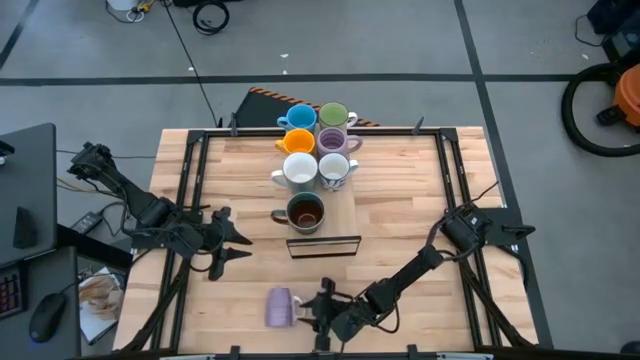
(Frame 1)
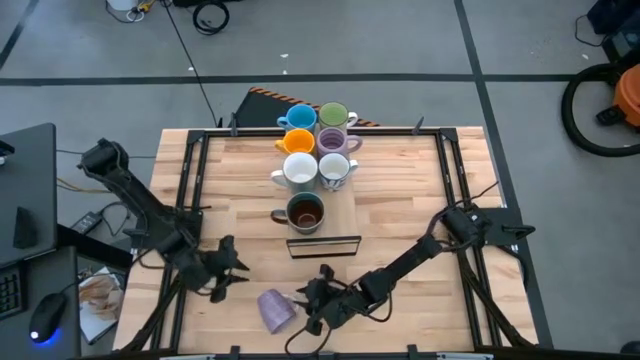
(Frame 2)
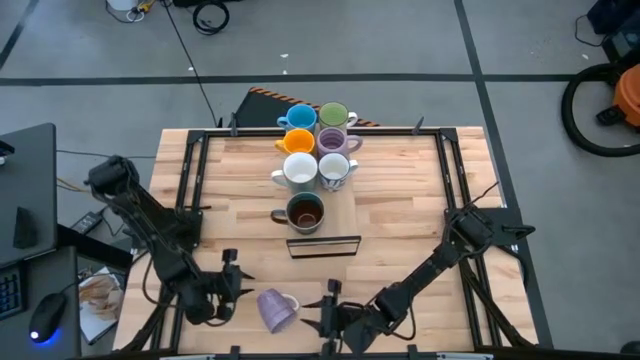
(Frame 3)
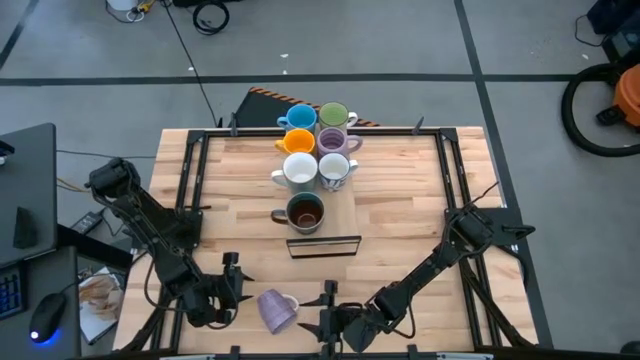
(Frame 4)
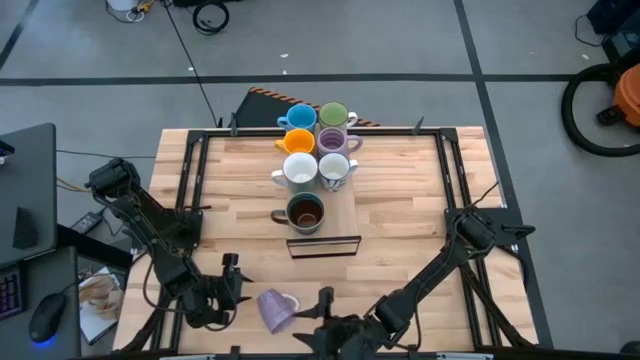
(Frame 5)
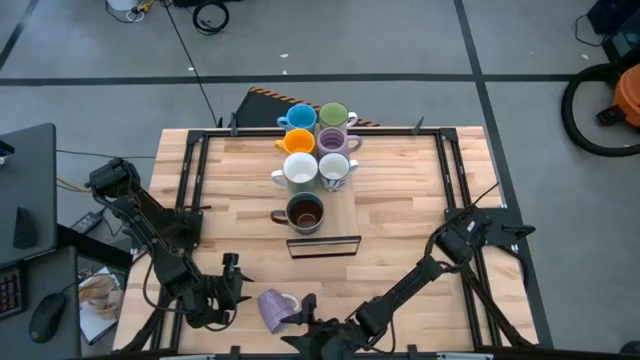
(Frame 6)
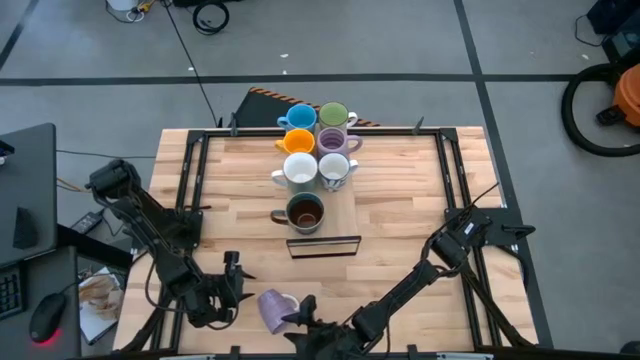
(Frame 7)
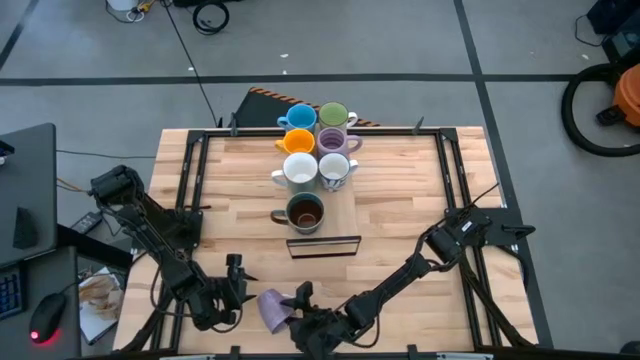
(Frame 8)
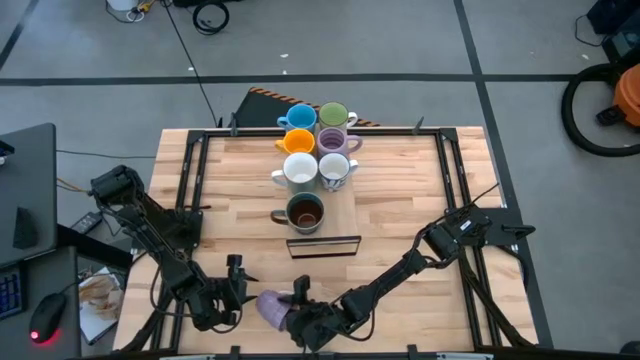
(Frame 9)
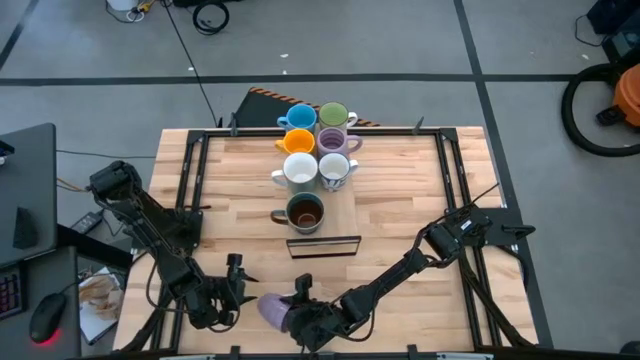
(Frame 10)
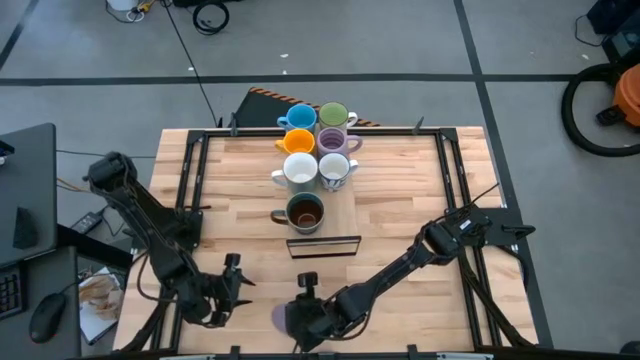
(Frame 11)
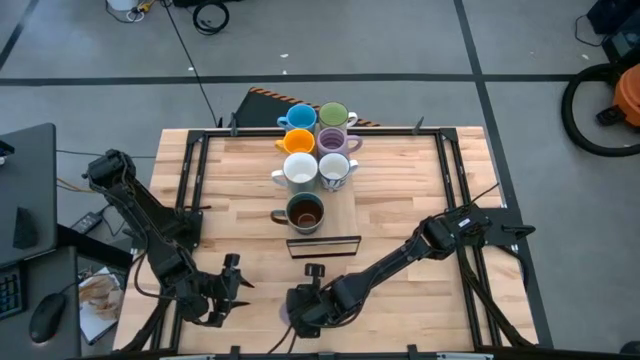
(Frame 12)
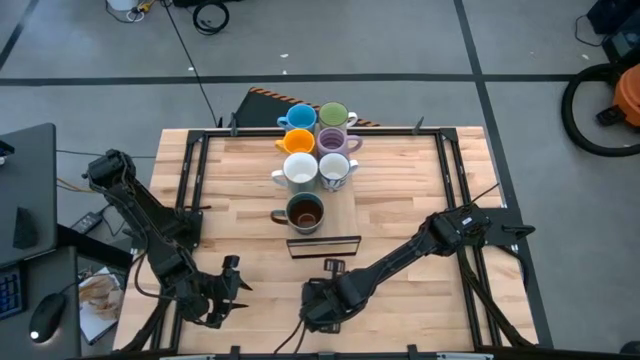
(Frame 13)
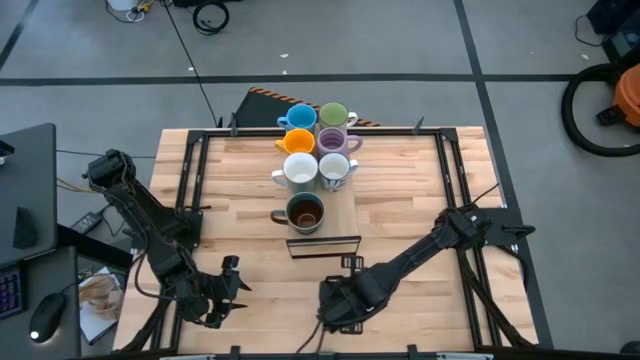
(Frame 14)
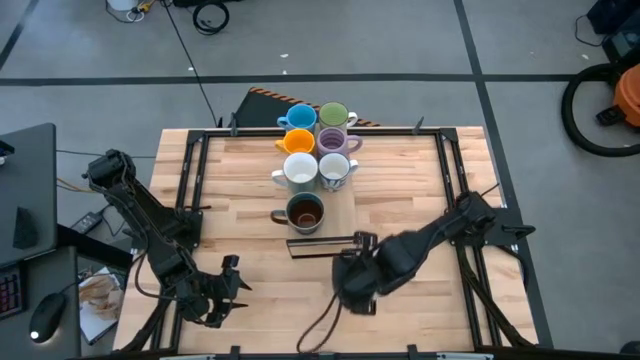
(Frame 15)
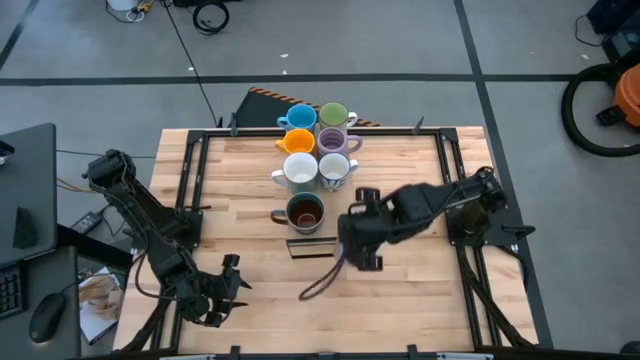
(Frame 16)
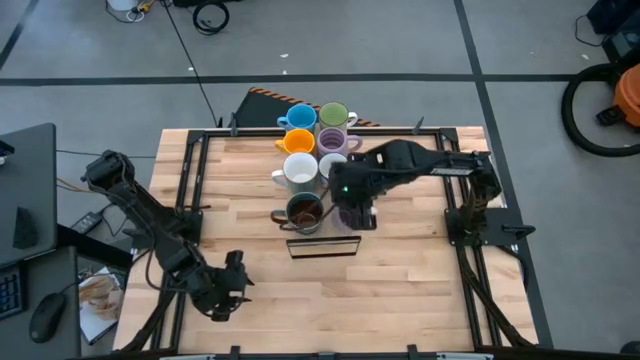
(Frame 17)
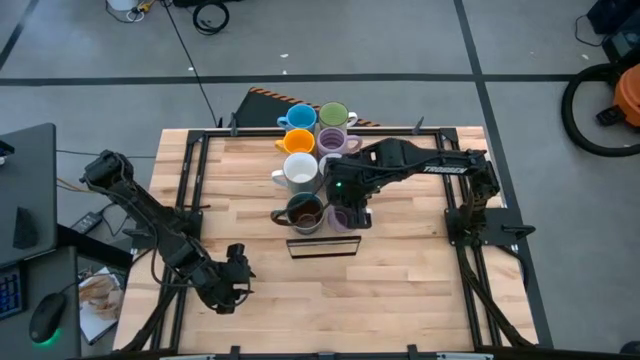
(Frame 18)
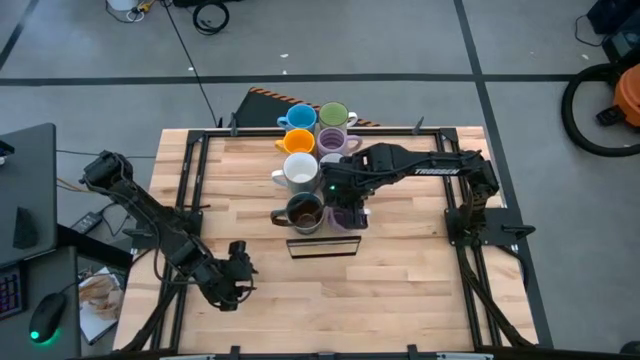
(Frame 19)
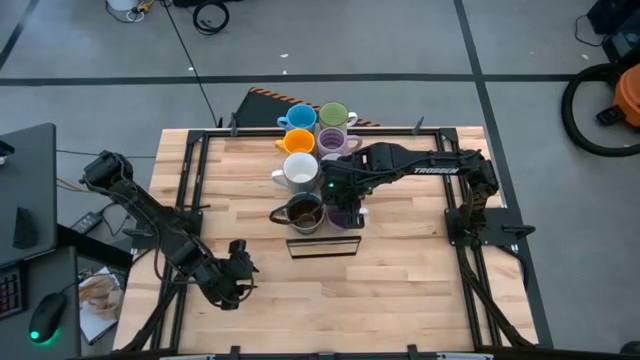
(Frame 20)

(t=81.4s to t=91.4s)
Task: Place coffee mugs
Put the purple-white mug on the shelf

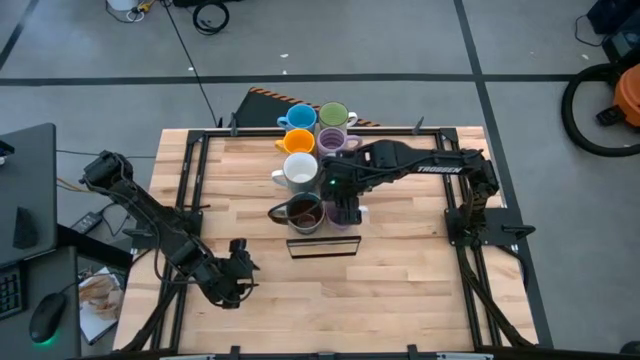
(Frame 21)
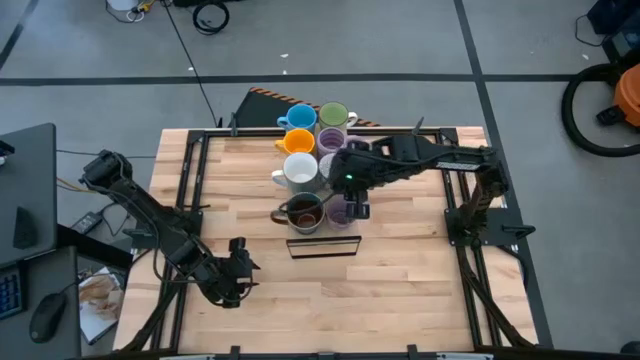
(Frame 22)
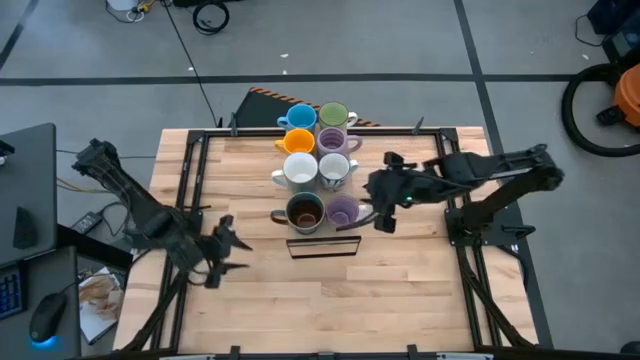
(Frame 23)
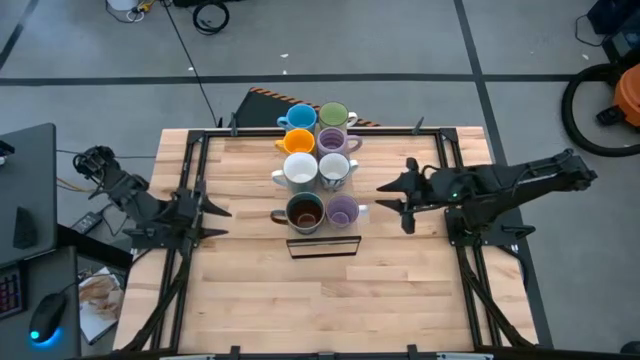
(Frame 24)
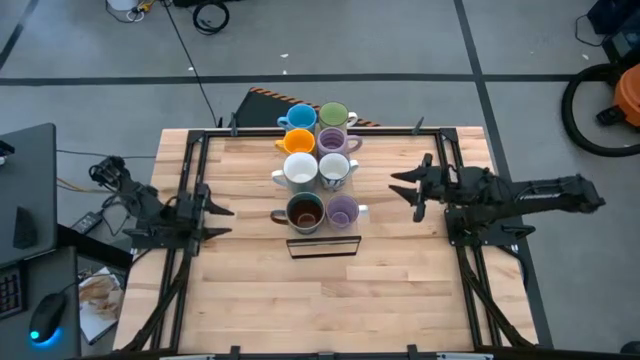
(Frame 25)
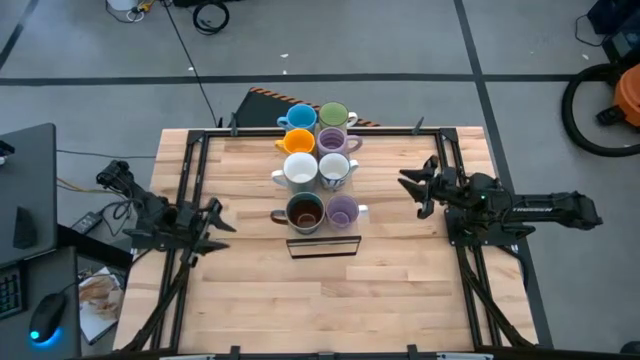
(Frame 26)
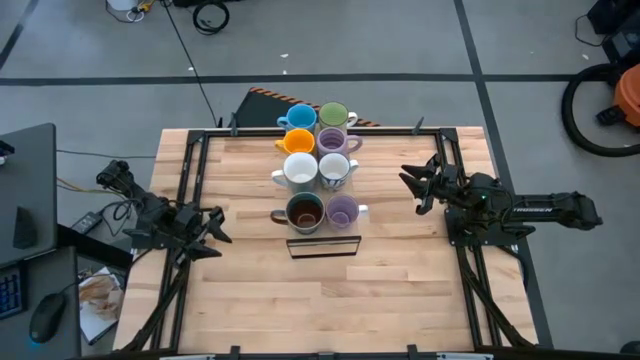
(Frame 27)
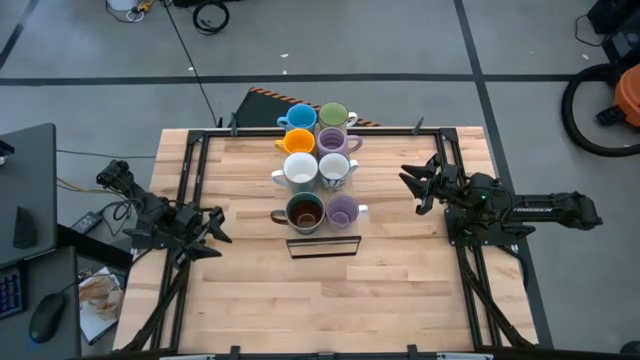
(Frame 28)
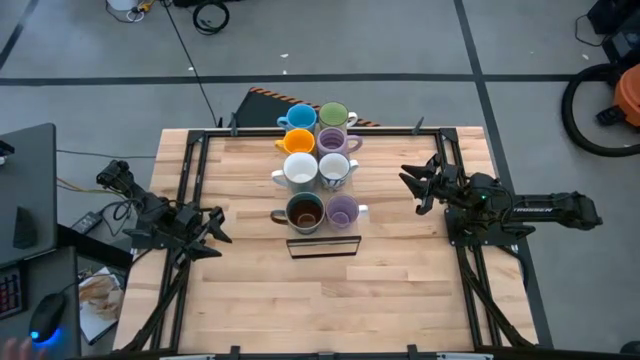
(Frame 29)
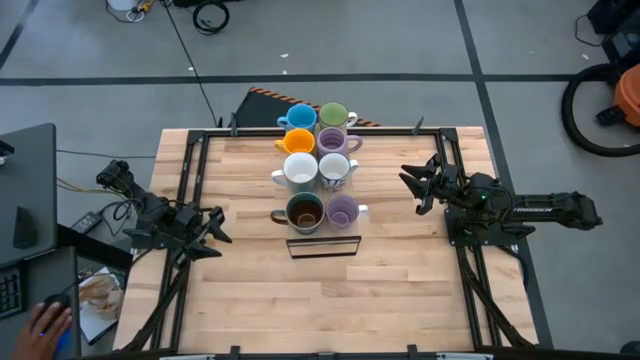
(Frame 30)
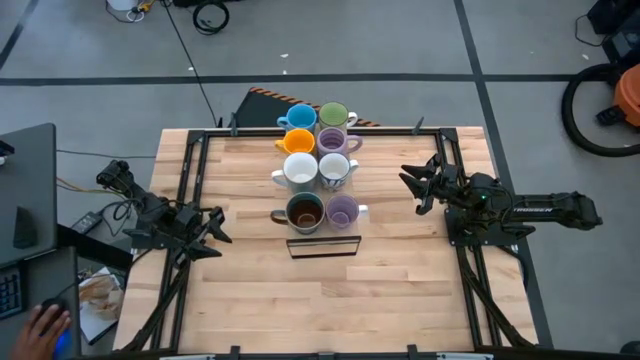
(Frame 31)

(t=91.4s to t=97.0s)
Return to Home Position

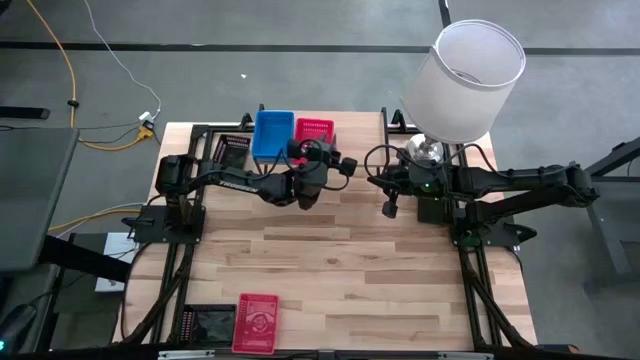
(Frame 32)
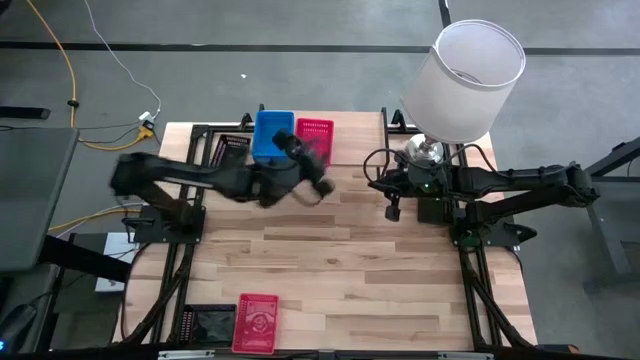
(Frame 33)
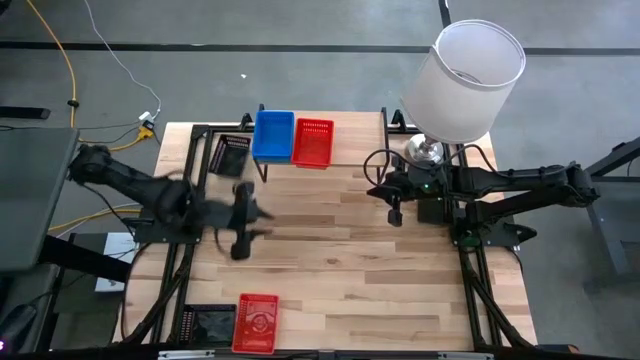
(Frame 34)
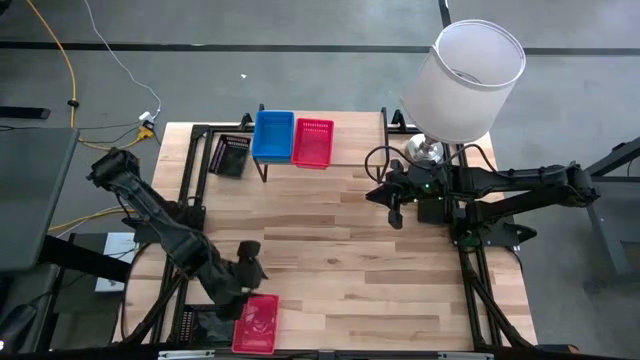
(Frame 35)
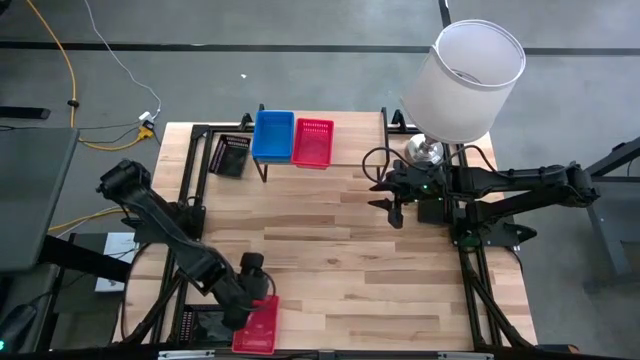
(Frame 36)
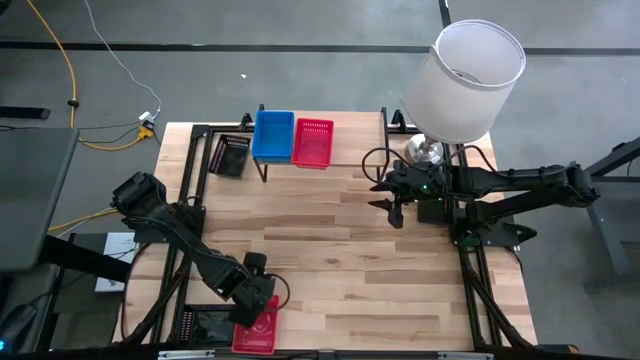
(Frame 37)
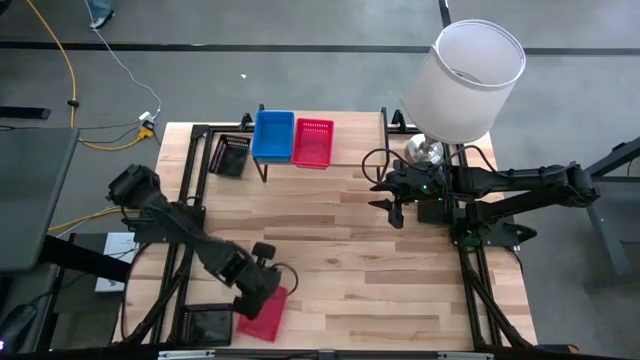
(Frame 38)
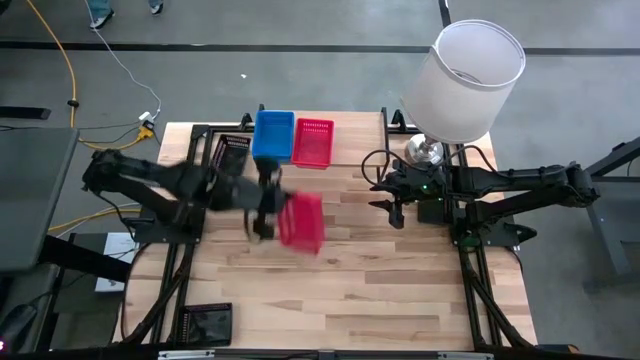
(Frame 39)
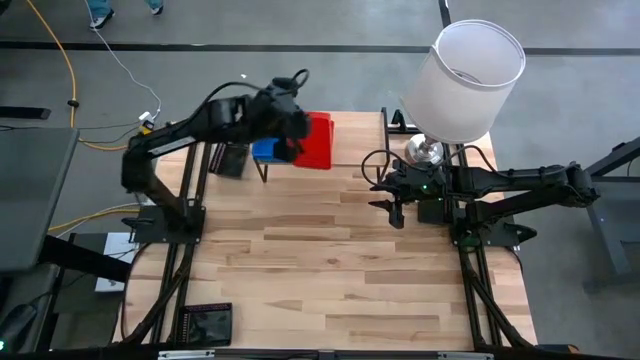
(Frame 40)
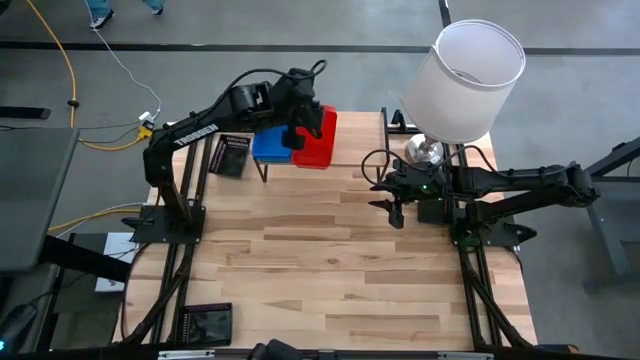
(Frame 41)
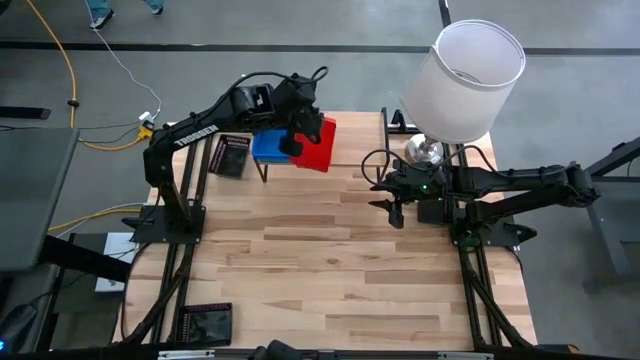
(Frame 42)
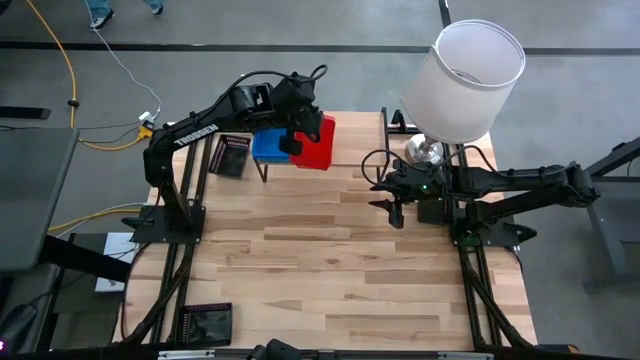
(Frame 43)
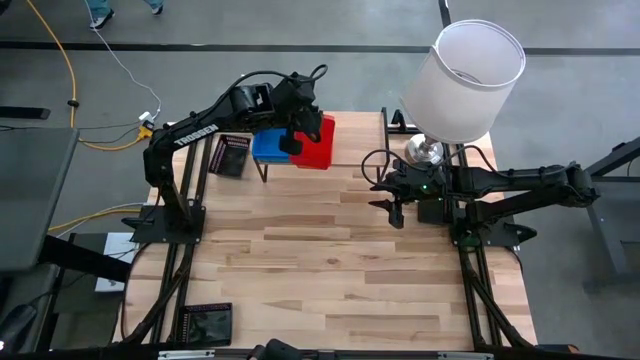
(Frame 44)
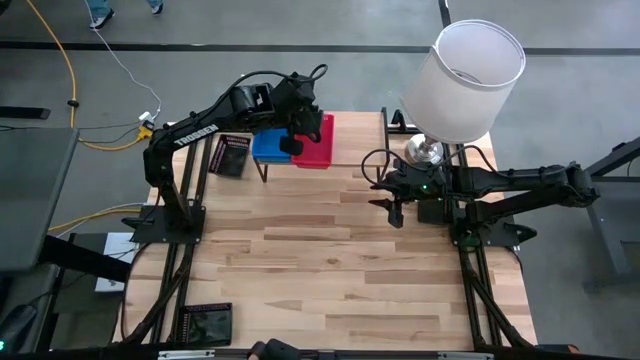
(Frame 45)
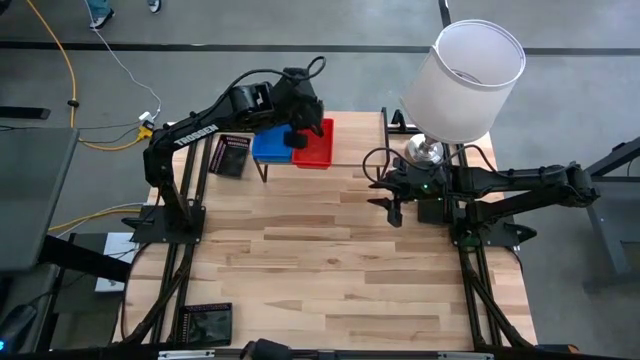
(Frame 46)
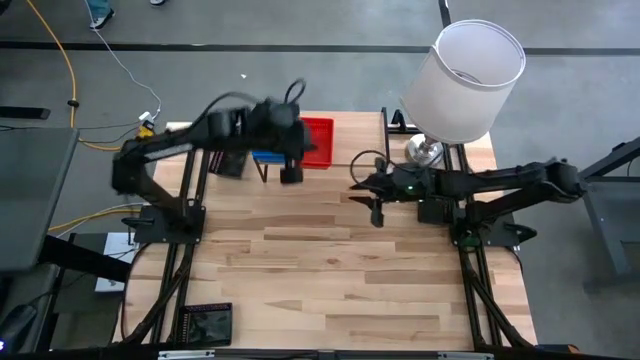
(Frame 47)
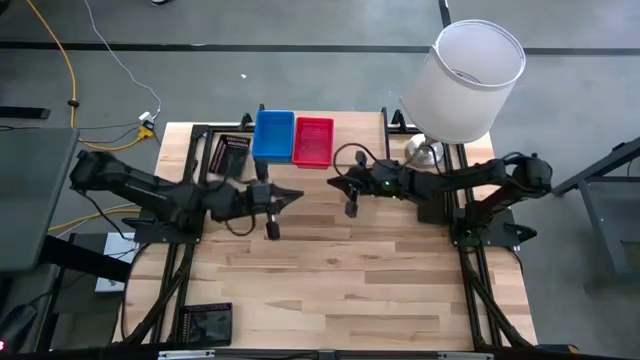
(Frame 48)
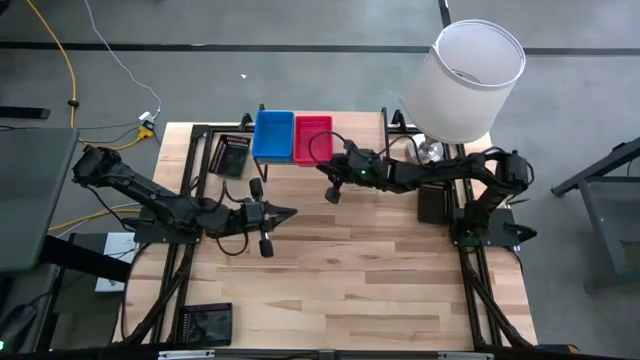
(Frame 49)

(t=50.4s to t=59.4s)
Task: Stack baskets on shelf by color
Stack the red bin on top of the red bin on the shelf
